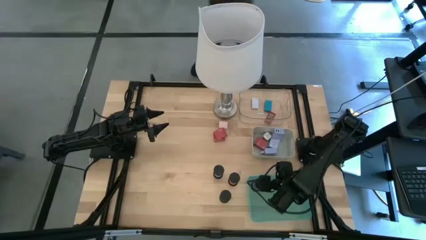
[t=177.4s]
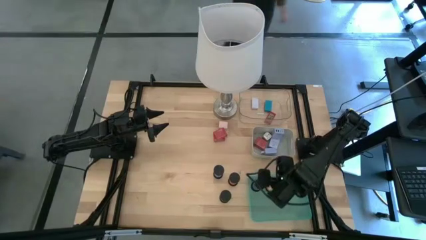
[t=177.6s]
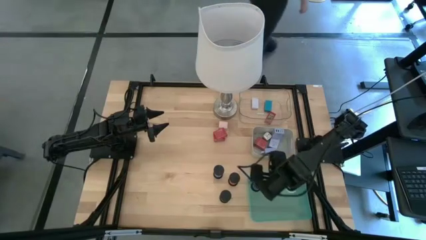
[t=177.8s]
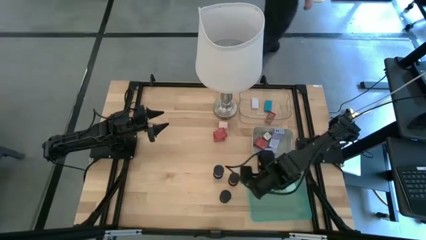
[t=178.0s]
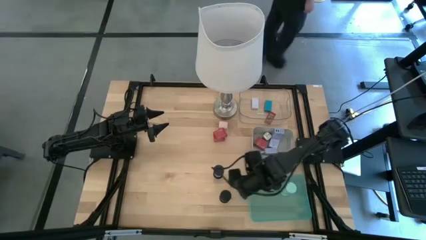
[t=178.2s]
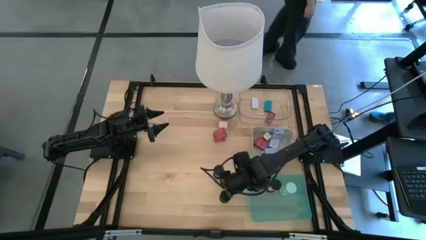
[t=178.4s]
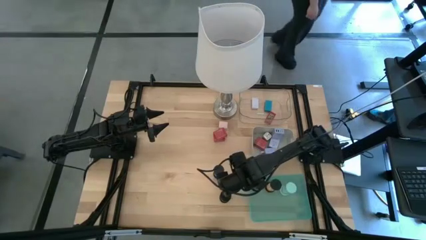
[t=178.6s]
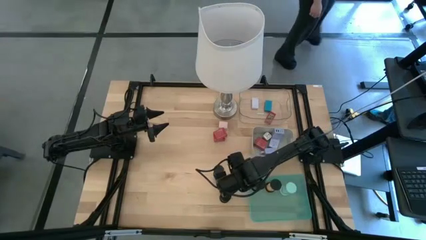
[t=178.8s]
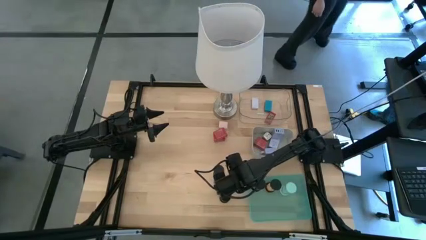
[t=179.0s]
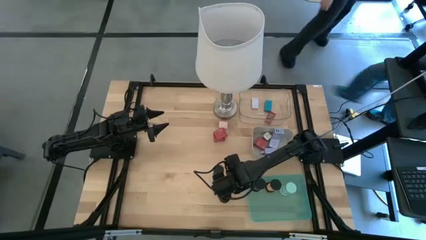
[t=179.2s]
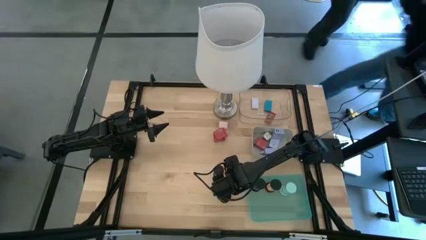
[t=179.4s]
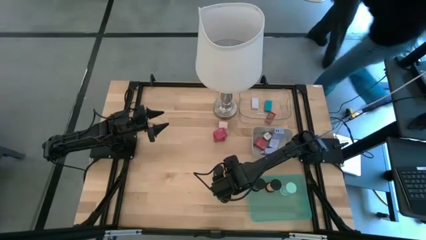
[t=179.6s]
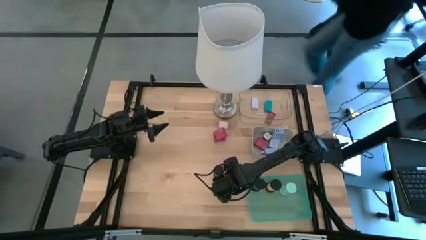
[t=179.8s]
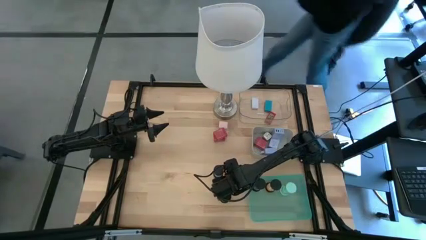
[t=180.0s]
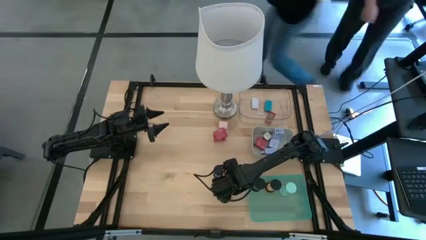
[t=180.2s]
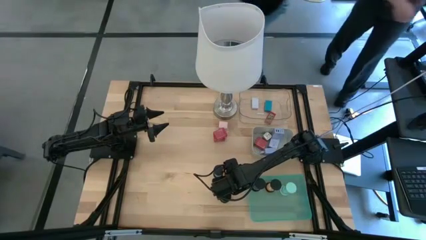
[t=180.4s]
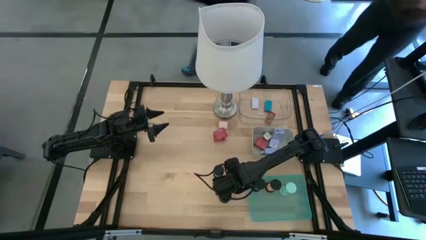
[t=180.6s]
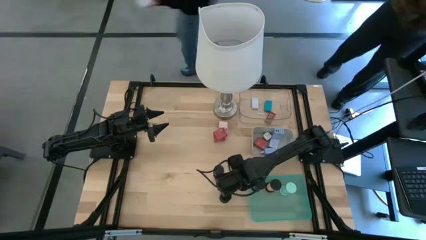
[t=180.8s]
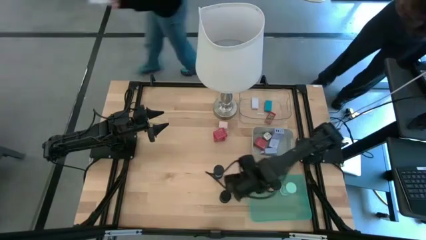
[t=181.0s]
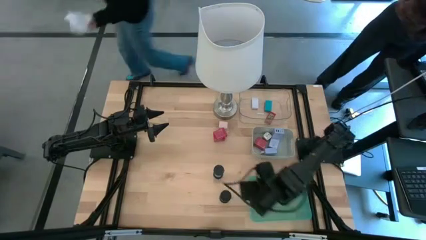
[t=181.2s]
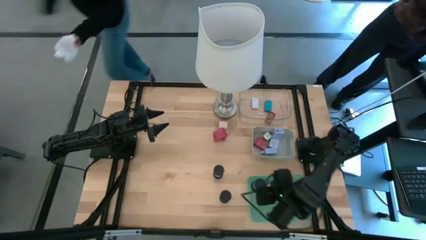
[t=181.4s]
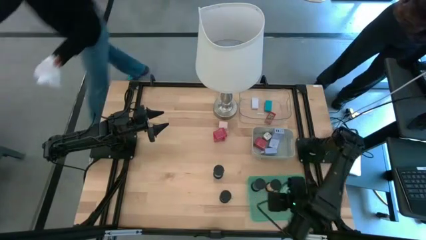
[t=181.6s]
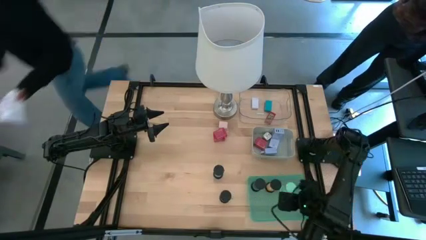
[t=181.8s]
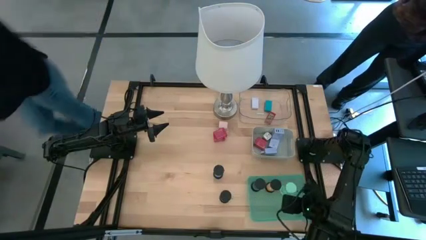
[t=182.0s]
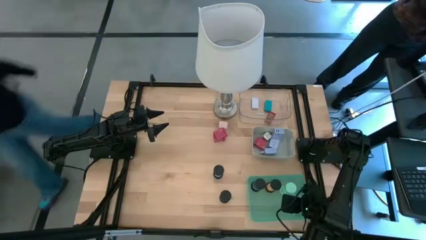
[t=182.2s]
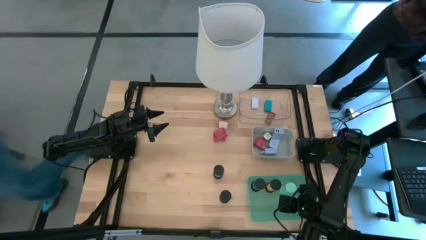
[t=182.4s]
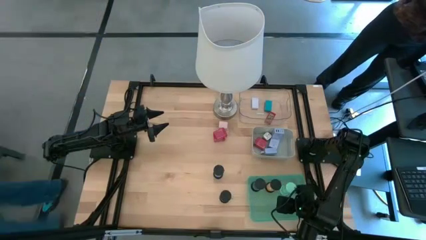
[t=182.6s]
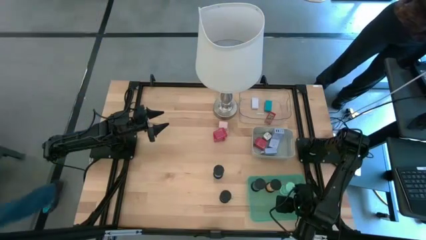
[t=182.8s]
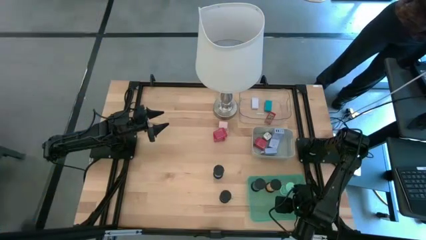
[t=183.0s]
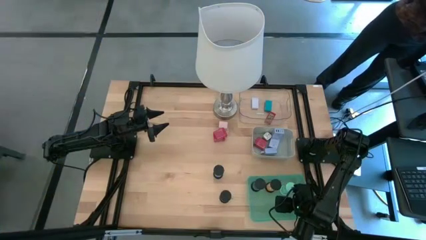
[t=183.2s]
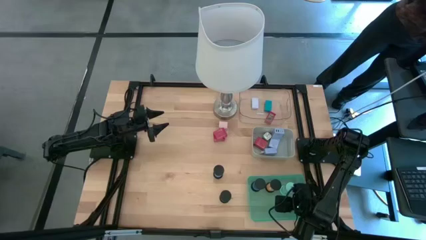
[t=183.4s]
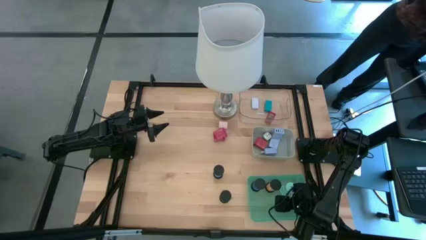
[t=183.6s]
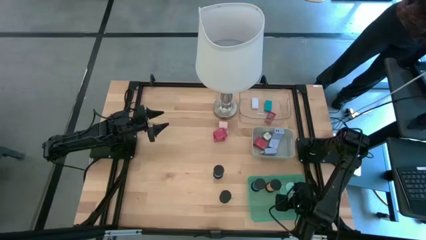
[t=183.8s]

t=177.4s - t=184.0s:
Task: Pick & Place Office items
Put the red hourglass into the light blue bin

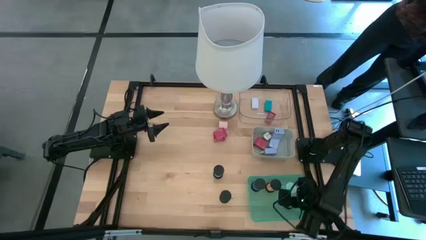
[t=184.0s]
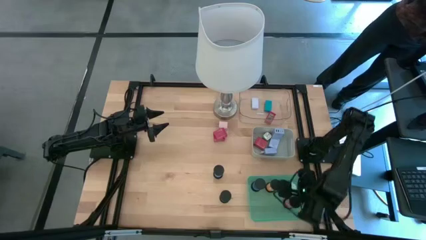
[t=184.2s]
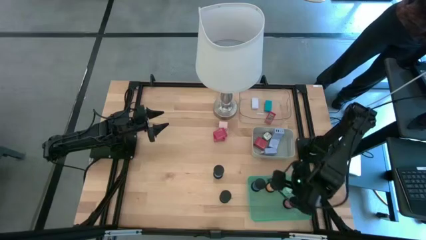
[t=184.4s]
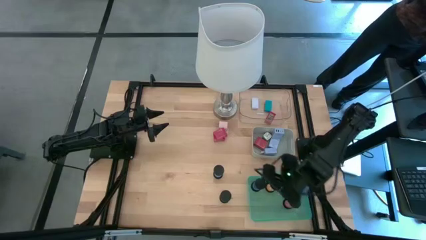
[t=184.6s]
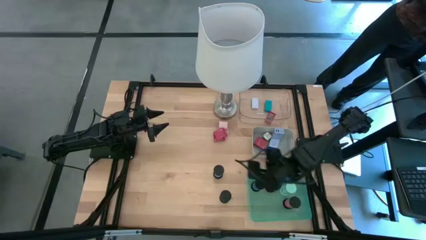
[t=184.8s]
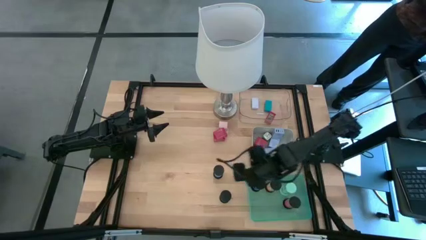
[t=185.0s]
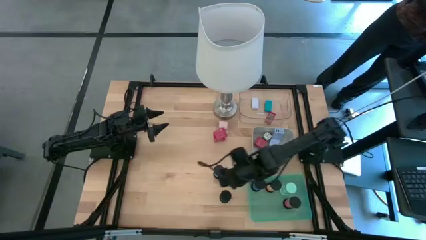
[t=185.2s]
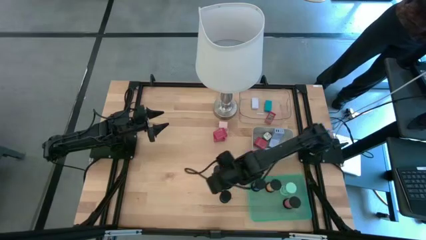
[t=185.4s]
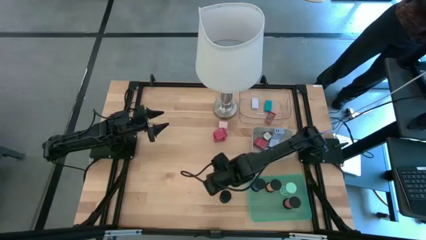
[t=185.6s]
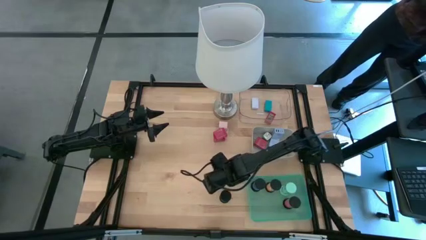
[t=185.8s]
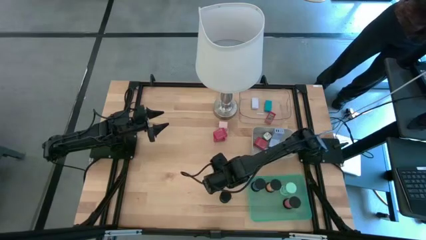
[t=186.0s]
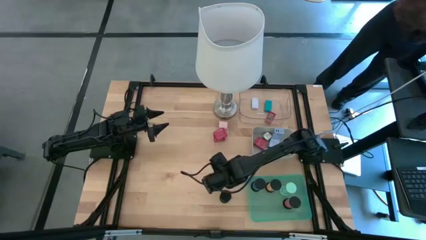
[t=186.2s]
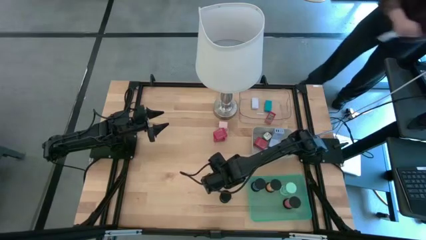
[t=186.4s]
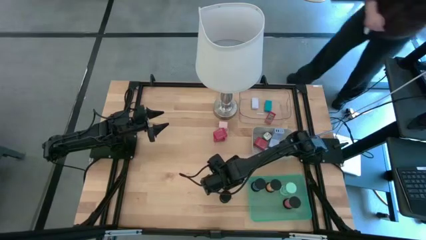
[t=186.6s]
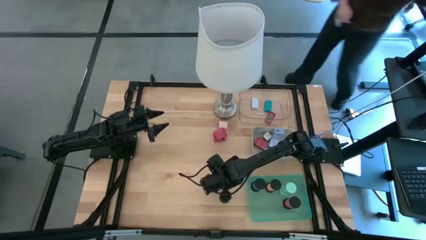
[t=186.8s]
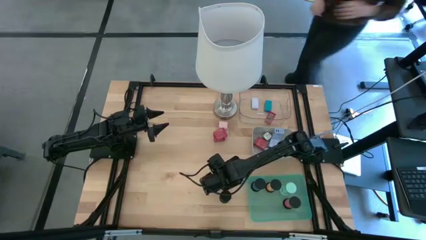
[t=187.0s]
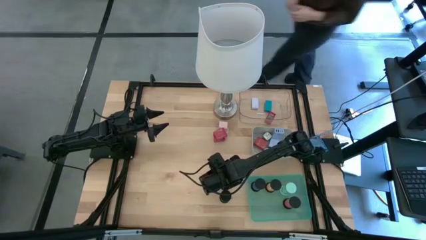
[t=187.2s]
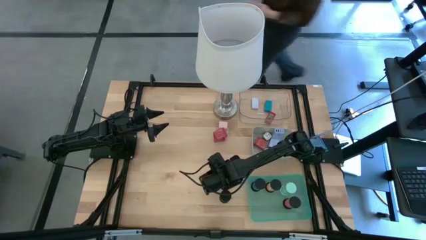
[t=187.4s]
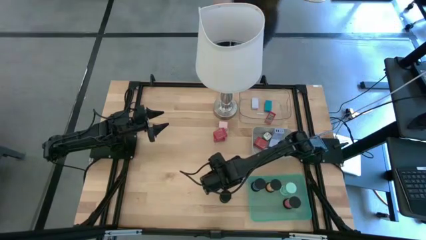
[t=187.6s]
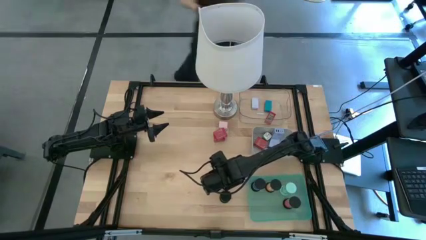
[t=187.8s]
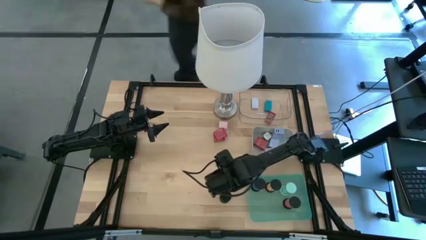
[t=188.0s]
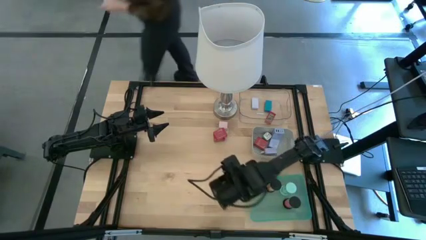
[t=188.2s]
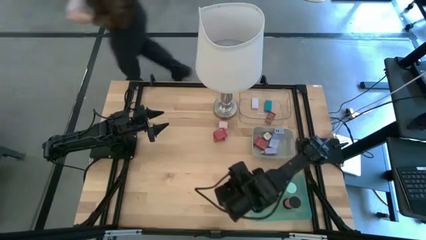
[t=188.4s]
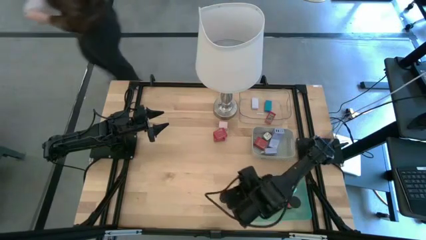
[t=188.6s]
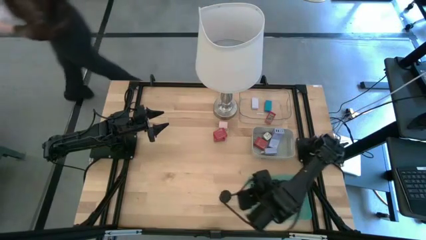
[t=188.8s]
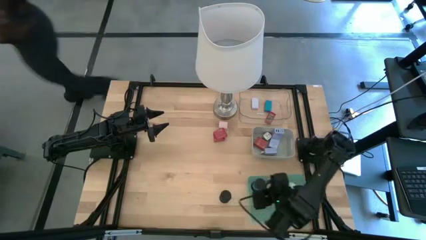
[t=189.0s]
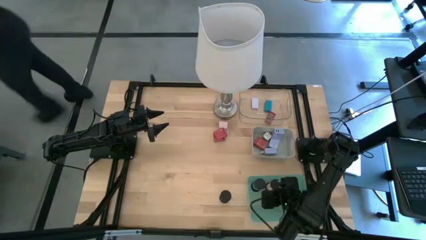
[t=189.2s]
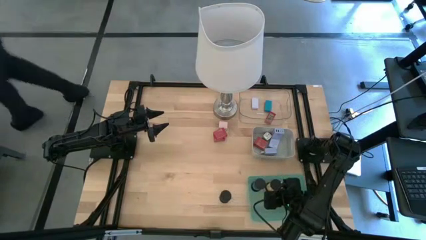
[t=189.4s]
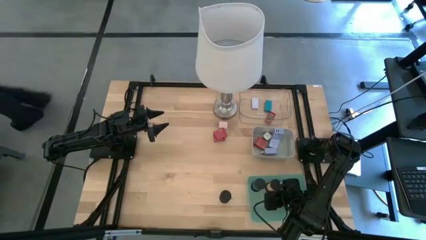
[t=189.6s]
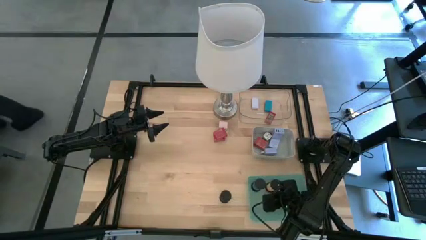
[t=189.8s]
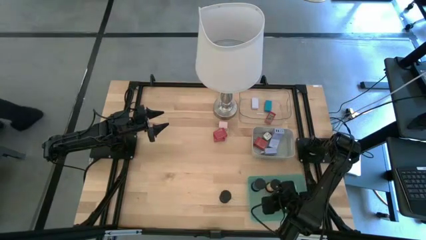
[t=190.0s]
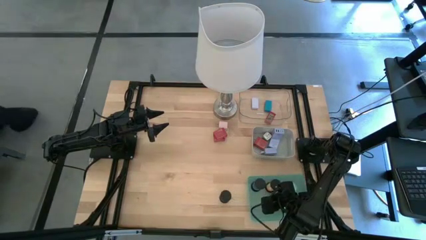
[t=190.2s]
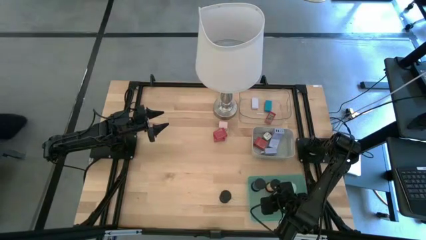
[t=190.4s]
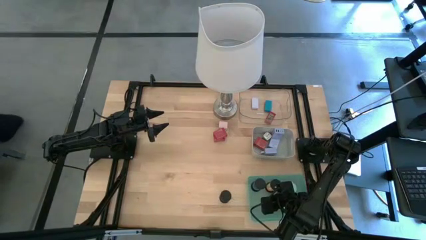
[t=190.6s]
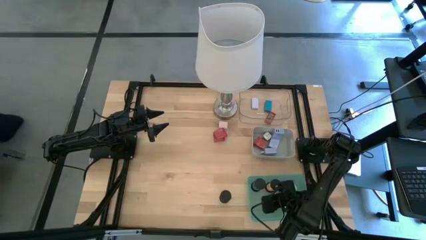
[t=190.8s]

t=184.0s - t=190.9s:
Put the blue hourglass into the light blue bin
